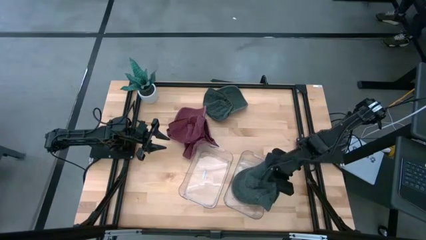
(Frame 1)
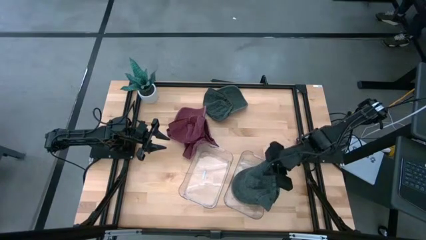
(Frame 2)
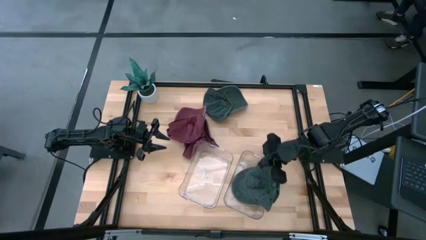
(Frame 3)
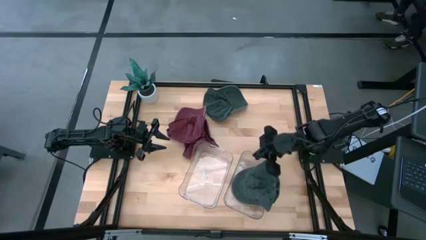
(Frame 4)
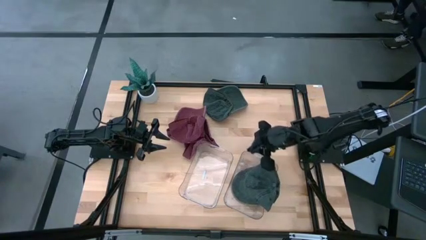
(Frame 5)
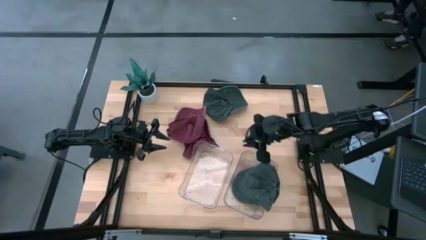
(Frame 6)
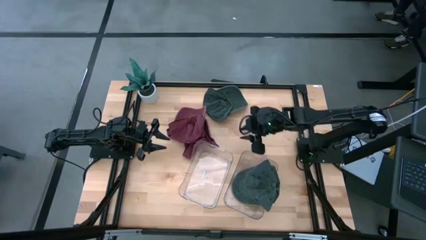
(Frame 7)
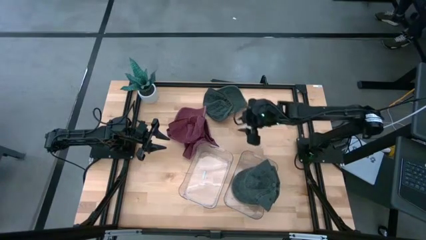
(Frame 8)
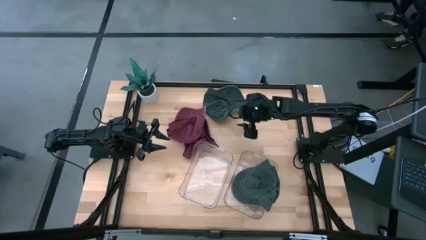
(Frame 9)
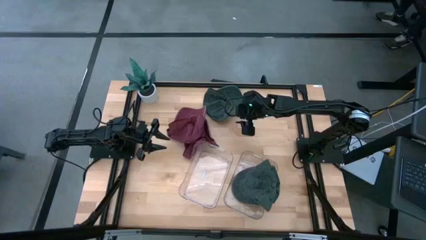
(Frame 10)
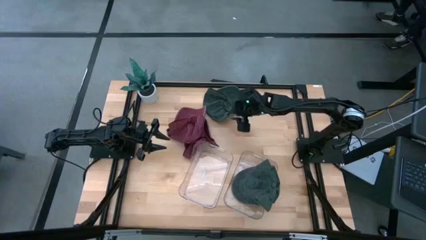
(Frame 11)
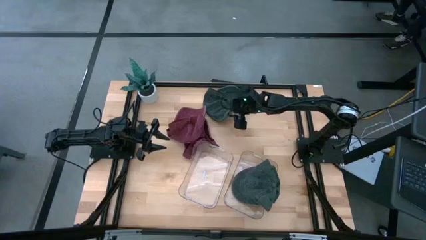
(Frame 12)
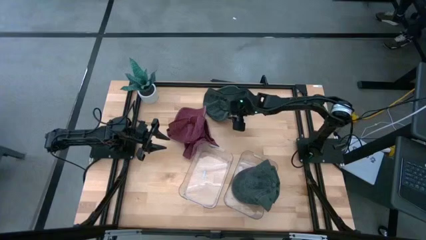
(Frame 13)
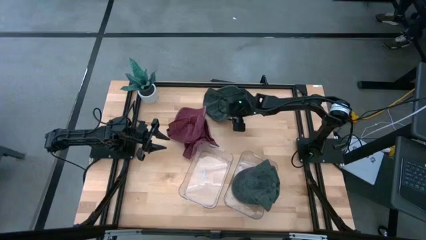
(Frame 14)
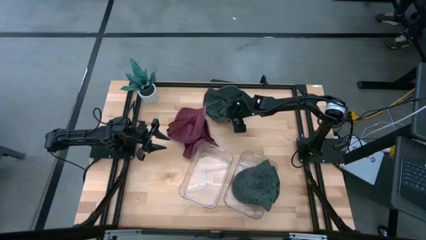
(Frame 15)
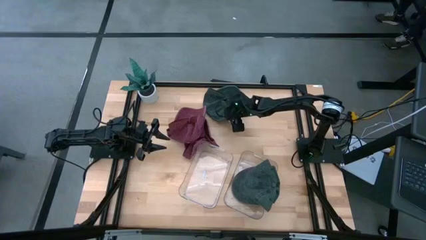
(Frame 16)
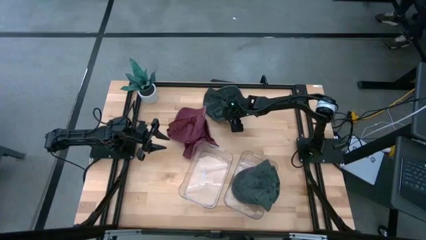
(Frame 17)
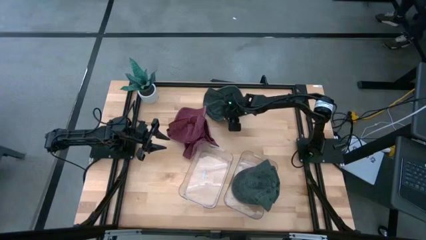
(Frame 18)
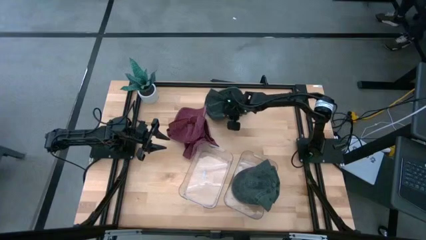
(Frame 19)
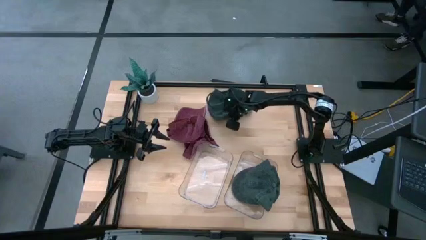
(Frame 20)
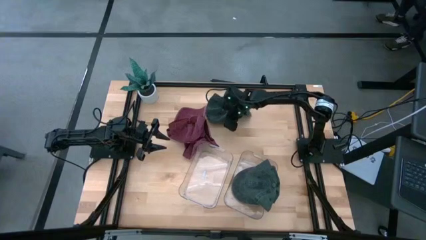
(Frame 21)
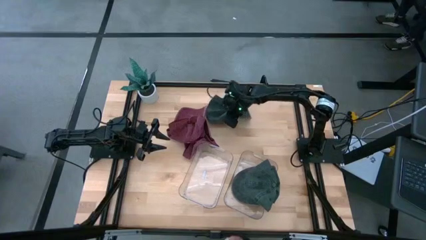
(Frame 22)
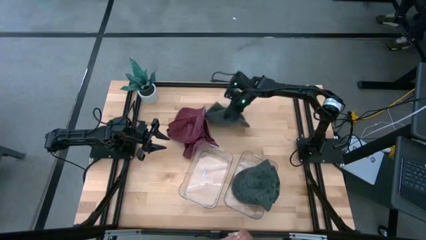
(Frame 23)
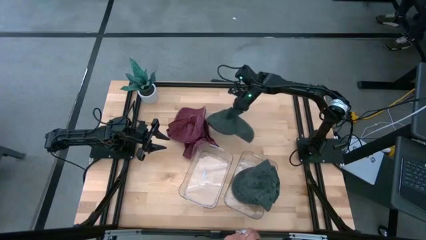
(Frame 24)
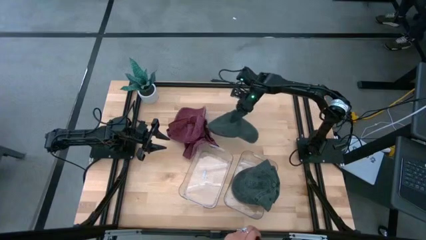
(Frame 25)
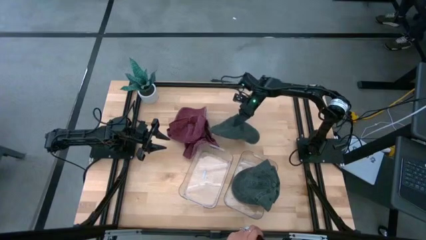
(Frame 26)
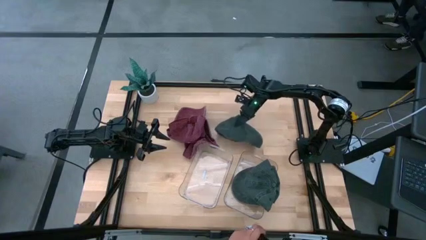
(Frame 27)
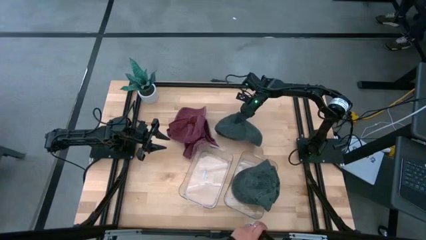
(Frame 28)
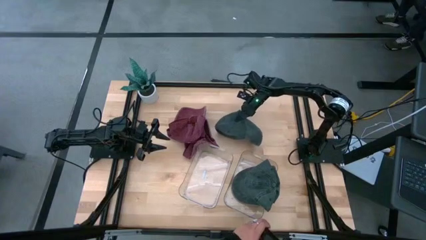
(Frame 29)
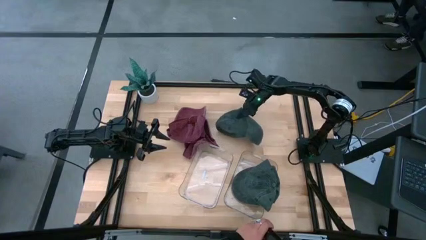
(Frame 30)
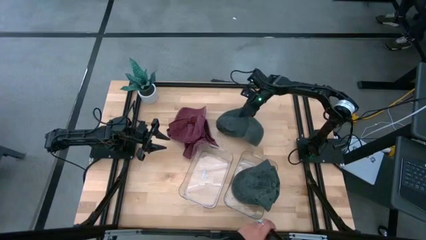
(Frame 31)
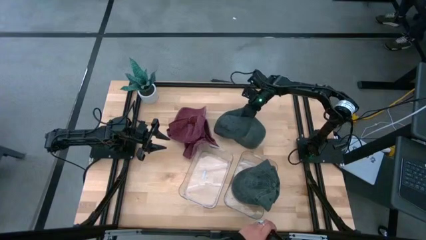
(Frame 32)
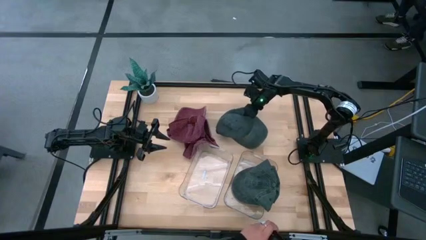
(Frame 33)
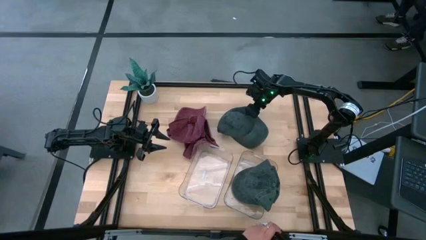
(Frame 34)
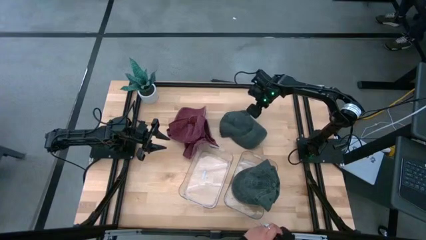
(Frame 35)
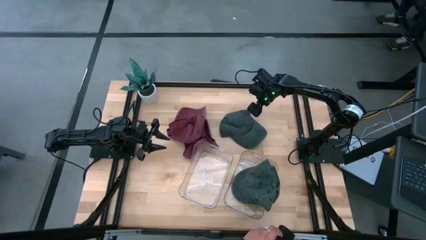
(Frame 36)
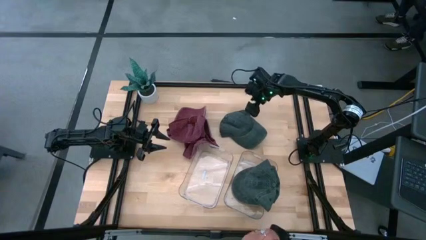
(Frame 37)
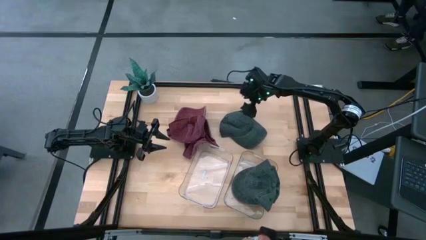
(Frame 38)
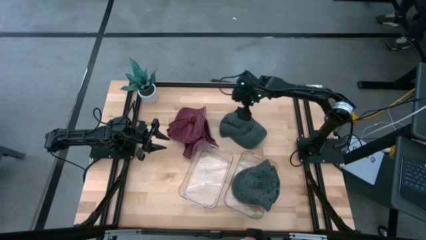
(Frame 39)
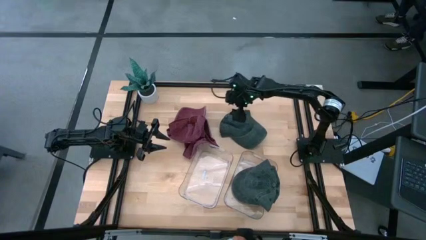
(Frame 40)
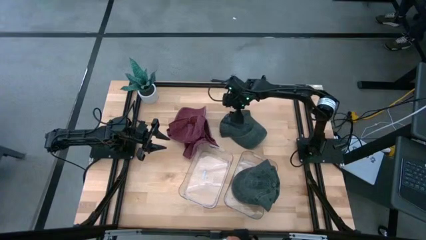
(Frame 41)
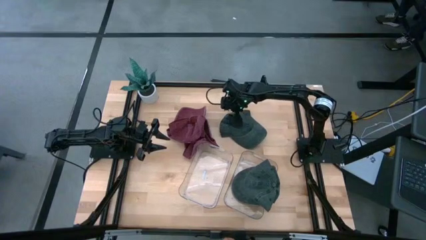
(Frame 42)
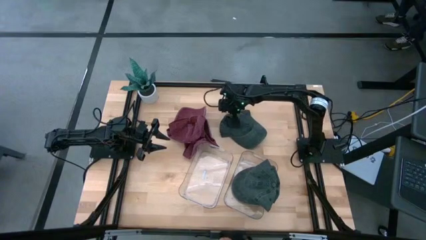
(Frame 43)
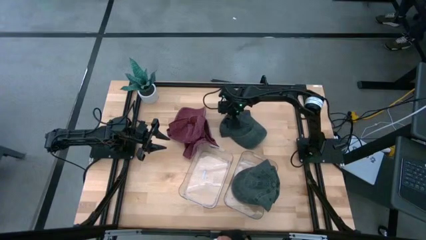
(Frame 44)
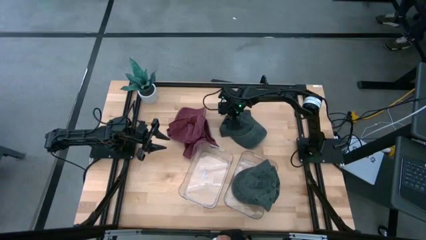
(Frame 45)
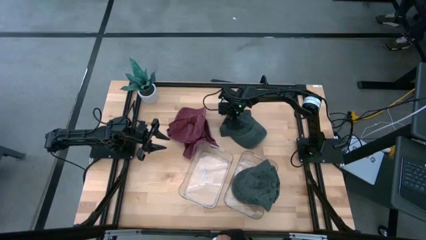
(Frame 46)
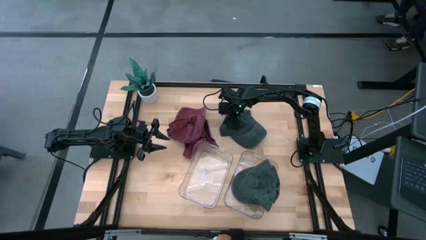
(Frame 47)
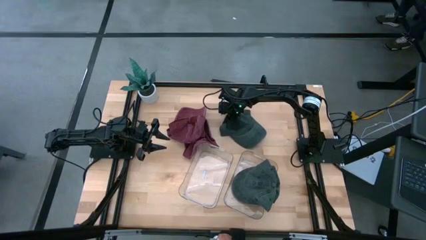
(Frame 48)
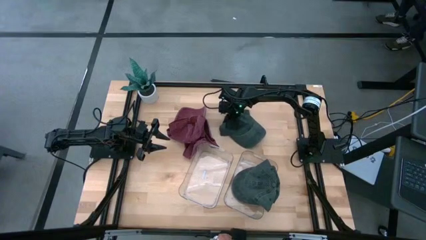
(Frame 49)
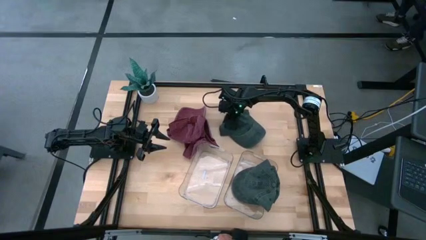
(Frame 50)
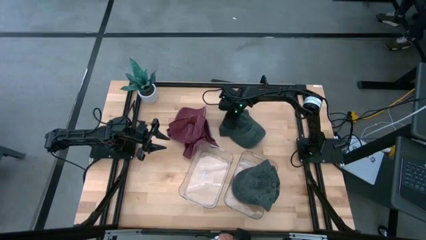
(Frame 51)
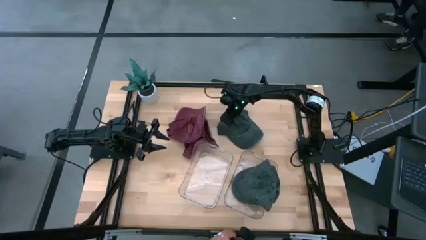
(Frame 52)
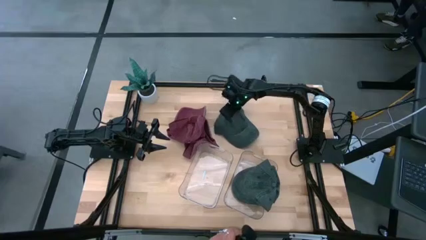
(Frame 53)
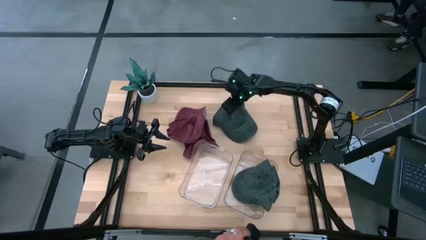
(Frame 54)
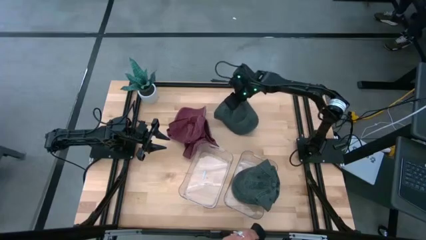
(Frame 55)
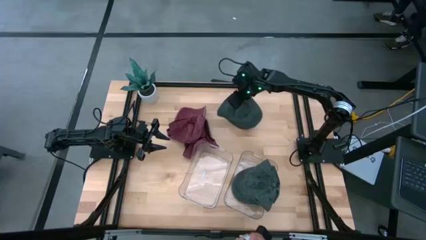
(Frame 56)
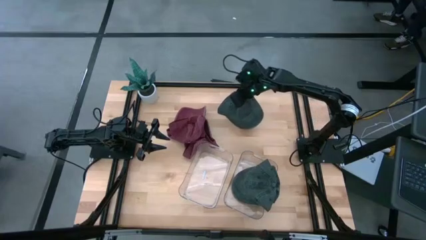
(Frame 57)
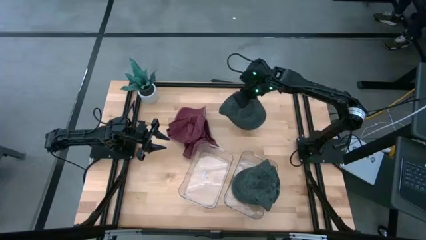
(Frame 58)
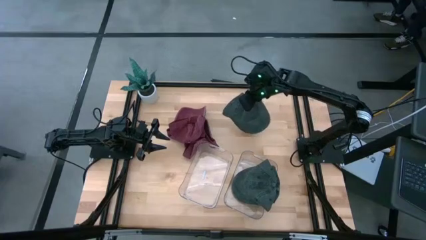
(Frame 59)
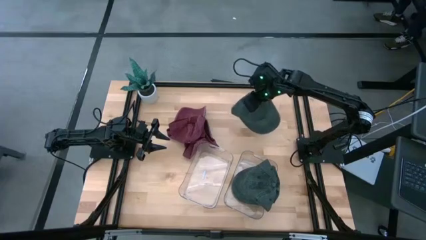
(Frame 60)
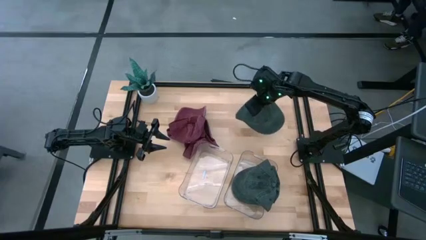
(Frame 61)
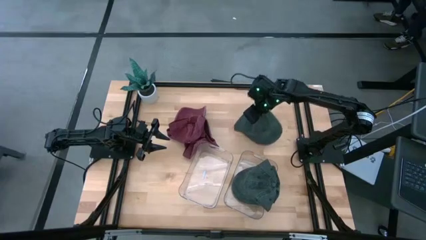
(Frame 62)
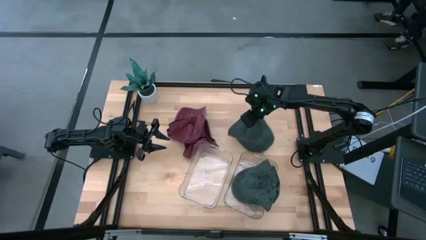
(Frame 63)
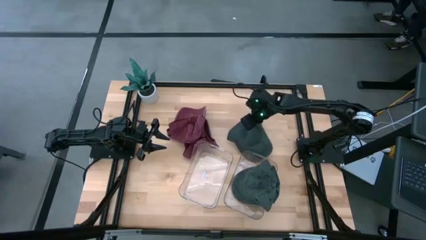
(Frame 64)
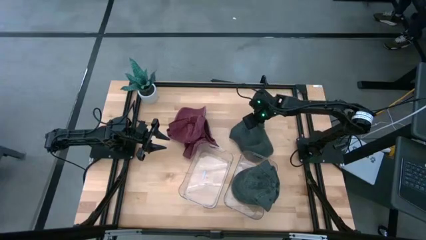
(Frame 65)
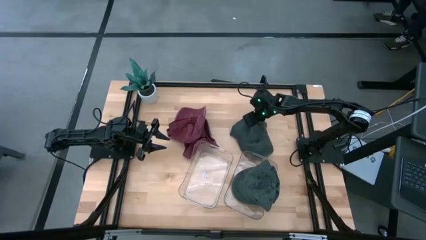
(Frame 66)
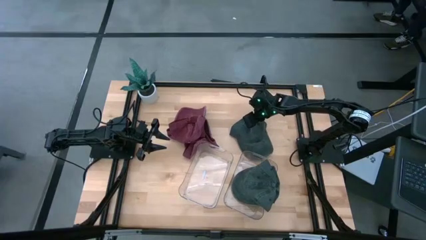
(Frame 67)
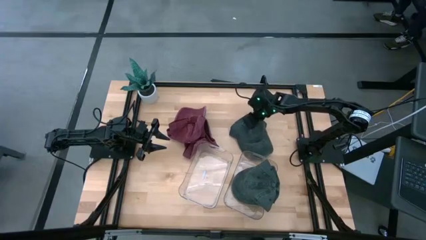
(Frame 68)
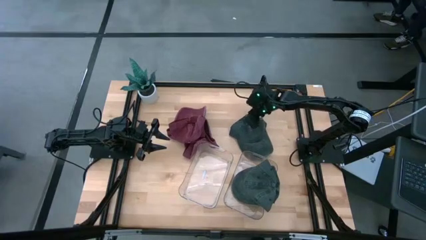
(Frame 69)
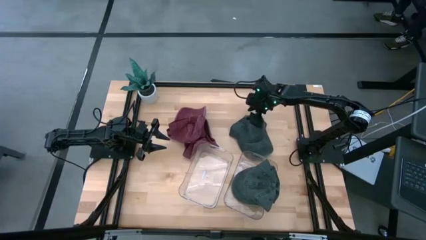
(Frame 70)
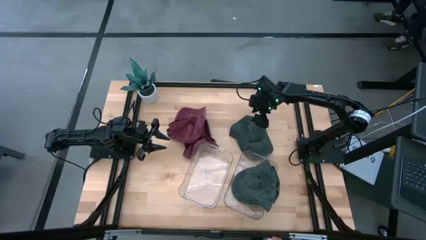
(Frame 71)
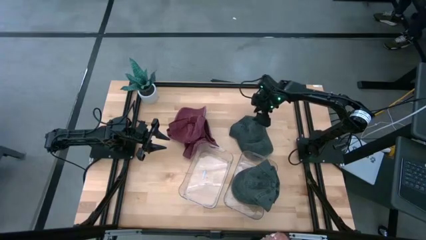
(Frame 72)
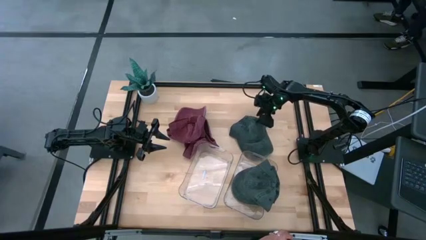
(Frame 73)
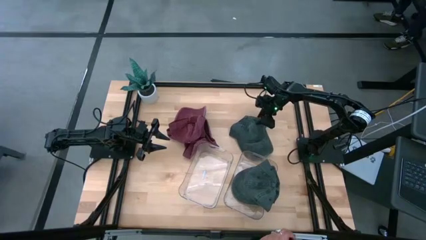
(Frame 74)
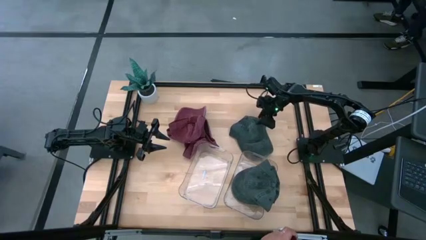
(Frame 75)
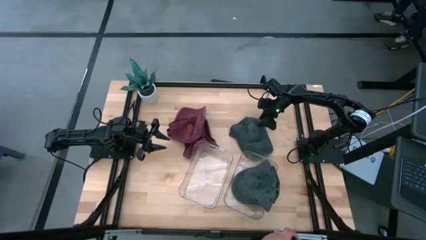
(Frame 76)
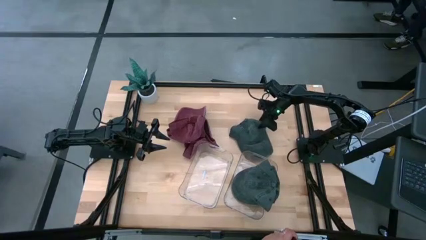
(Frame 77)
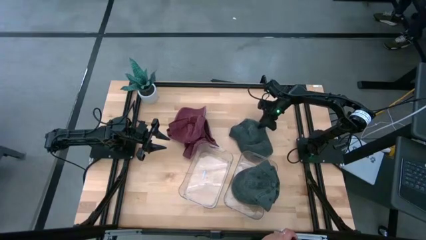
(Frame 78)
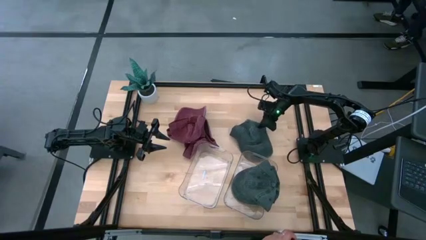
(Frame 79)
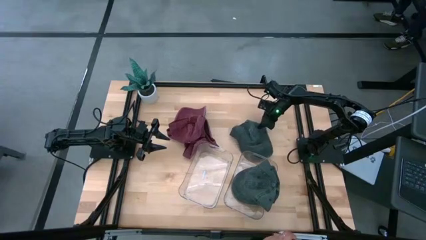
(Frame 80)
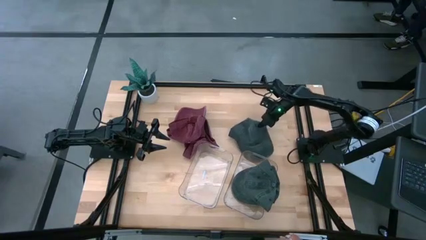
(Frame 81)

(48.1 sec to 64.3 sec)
Task: Pick & Place hat
Put the gray cap into the right transparent bin
